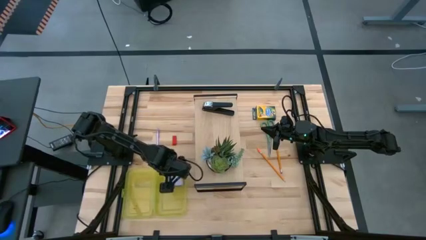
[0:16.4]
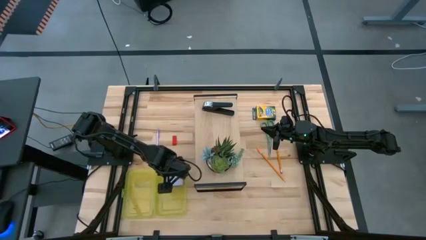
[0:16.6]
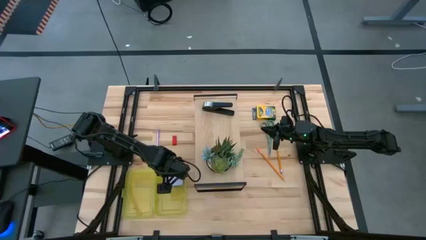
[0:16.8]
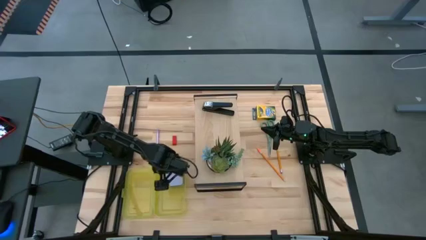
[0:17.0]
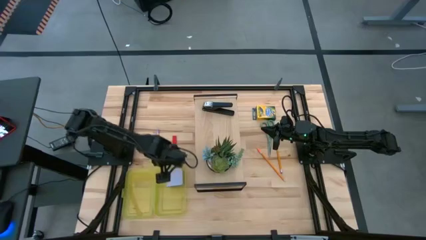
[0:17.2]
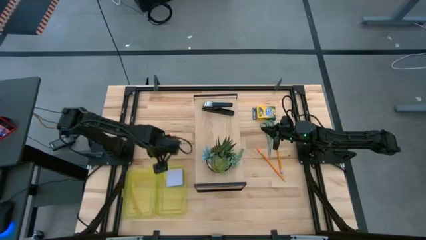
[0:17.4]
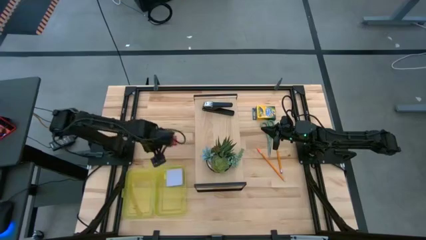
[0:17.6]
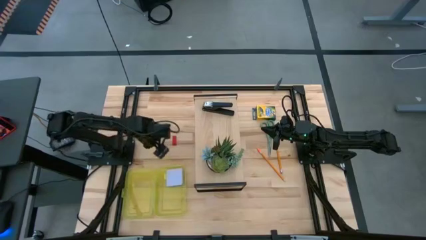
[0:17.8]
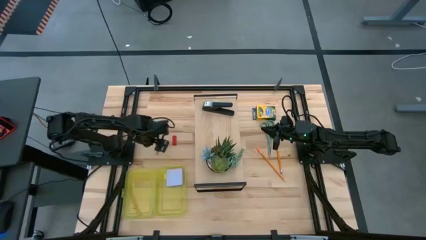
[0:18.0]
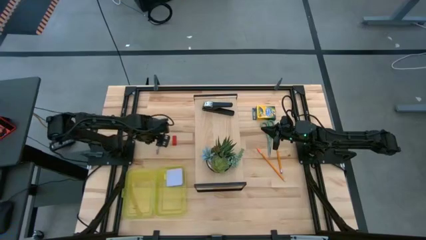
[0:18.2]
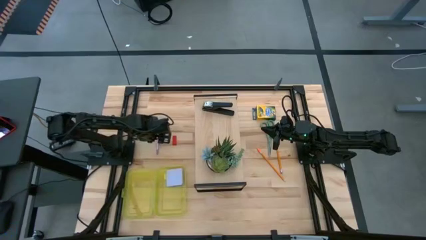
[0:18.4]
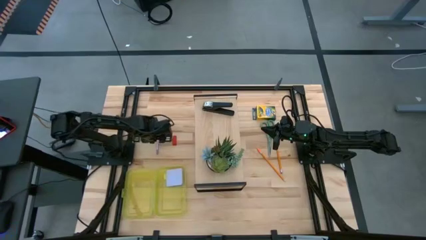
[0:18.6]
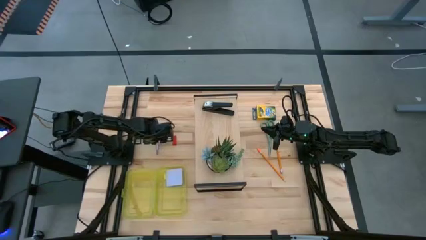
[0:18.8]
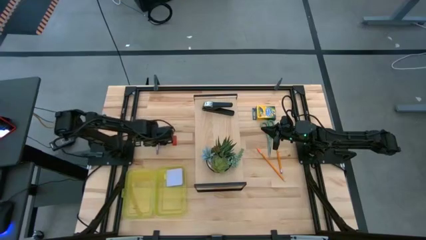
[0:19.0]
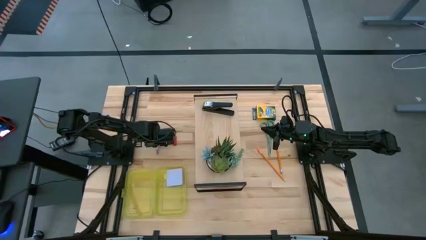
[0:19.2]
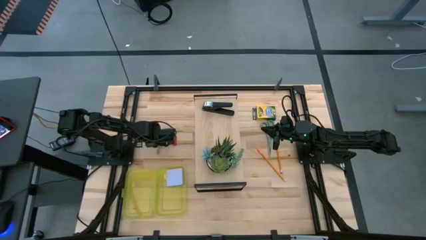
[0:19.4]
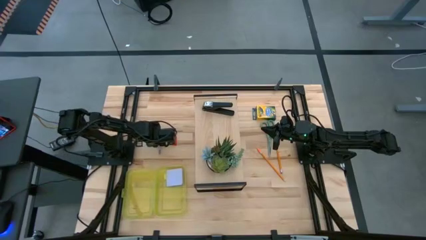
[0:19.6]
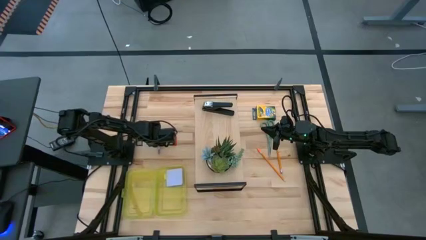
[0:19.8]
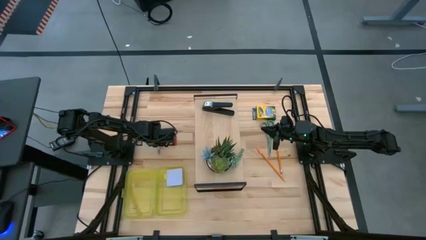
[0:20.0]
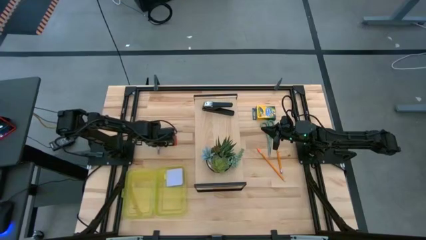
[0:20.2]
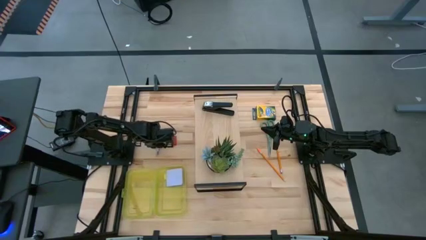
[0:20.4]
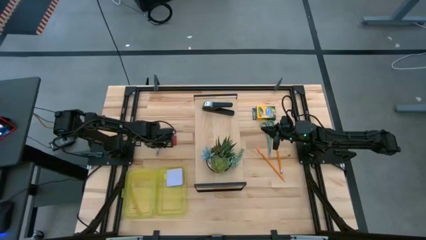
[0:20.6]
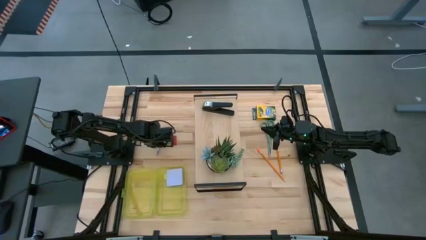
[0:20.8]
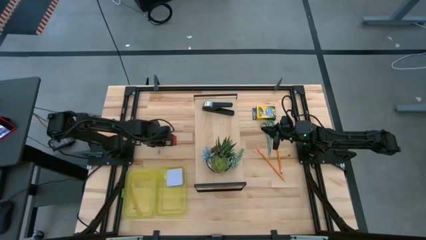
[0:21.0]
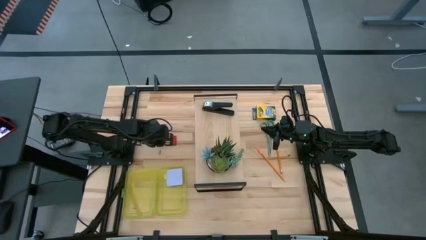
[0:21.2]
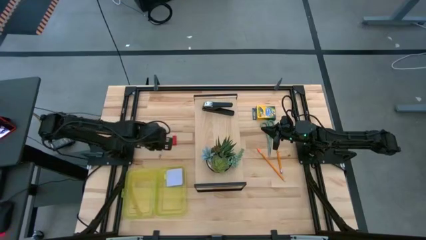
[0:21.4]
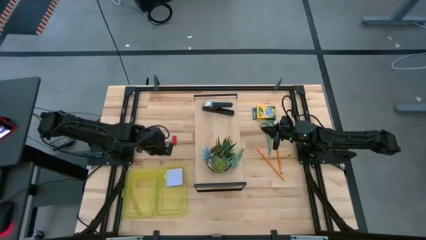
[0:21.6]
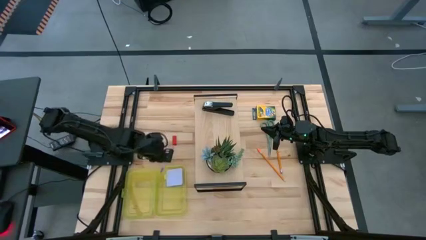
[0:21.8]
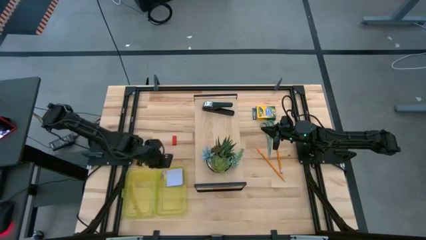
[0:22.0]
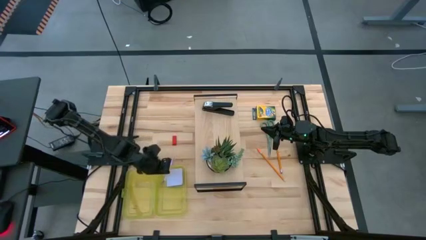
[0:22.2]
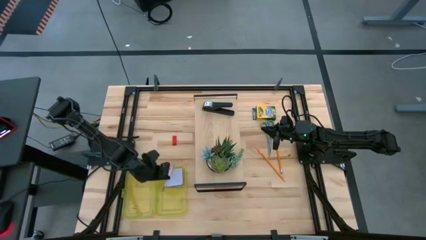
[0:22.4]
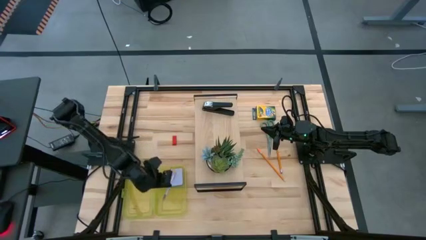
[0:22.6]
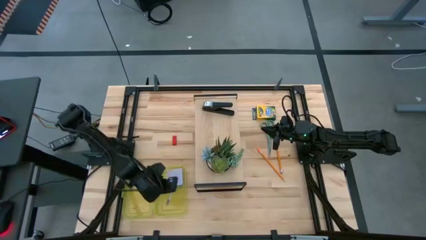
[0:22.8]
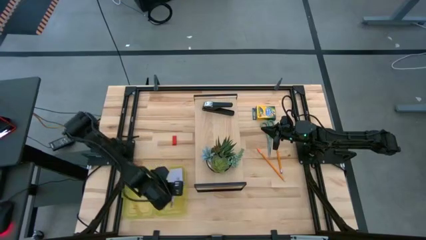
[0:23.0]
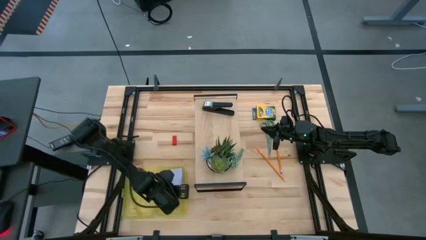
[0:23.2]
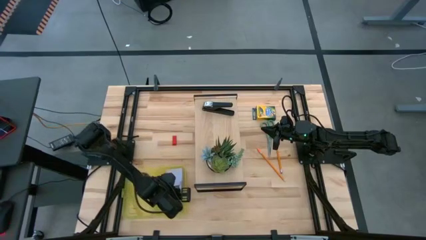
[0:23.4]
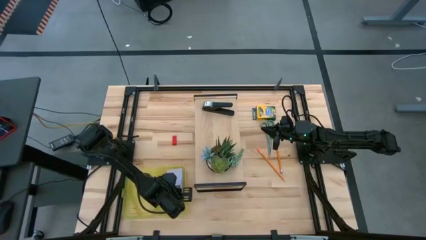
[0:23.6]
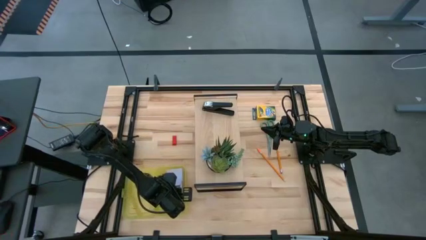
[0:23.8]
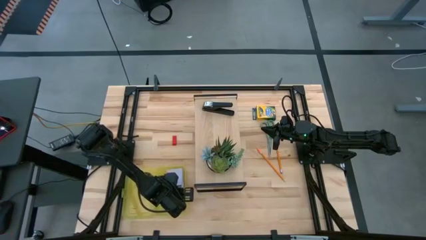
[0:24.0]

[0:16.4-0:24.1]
Task: Pack school essentials
Put the pink ballpoint pen into the yellow supply box

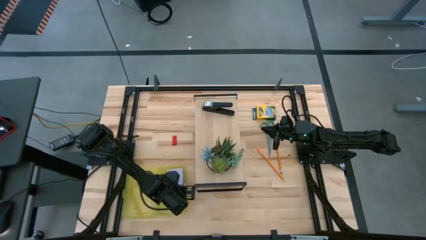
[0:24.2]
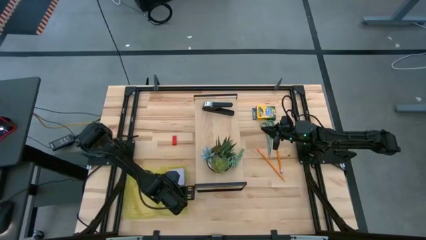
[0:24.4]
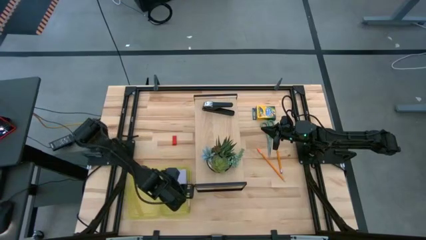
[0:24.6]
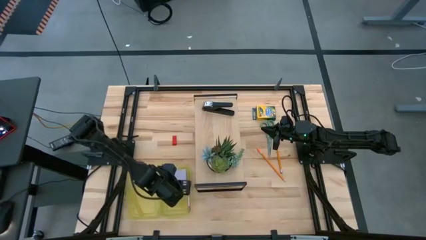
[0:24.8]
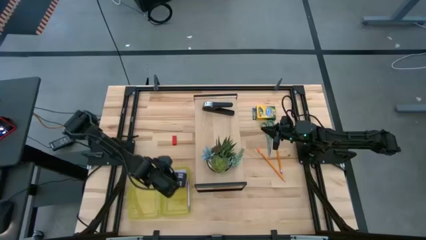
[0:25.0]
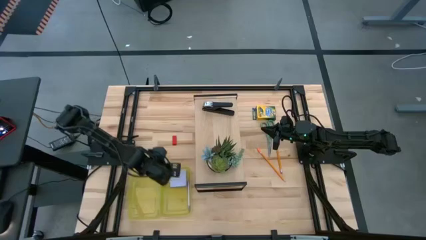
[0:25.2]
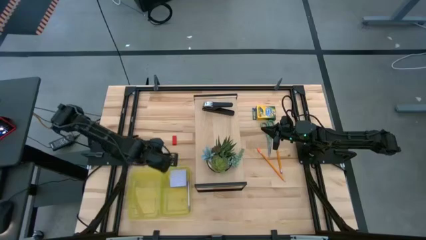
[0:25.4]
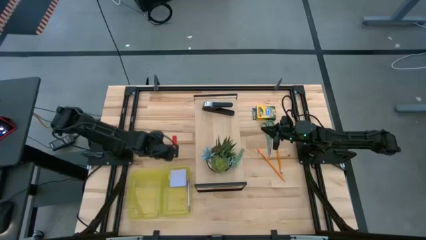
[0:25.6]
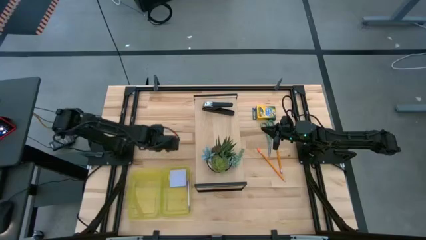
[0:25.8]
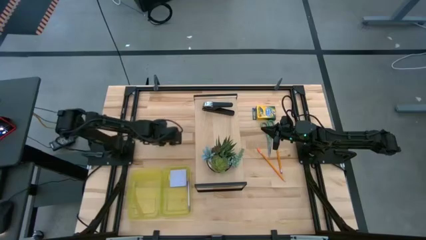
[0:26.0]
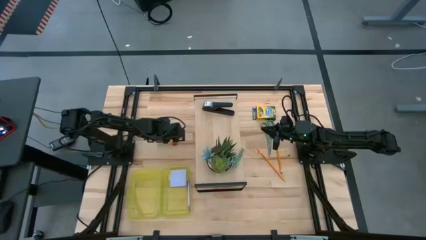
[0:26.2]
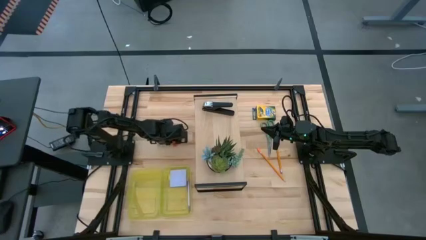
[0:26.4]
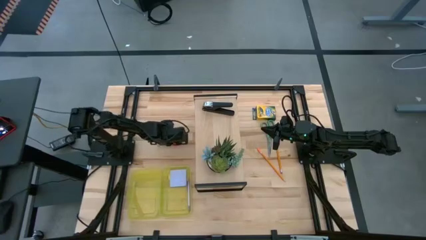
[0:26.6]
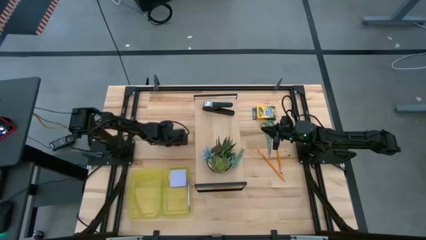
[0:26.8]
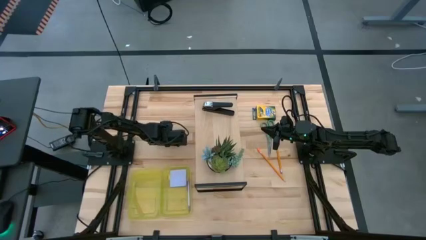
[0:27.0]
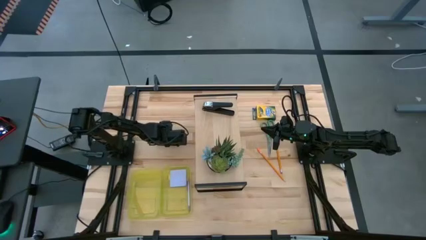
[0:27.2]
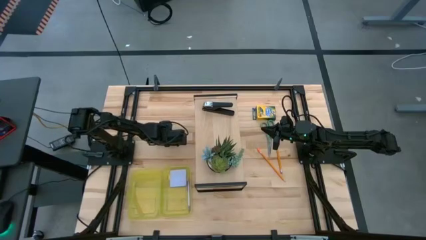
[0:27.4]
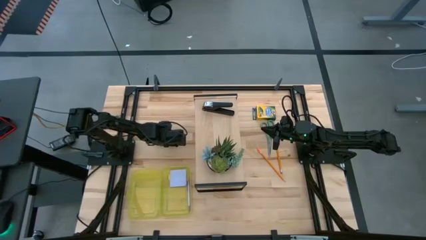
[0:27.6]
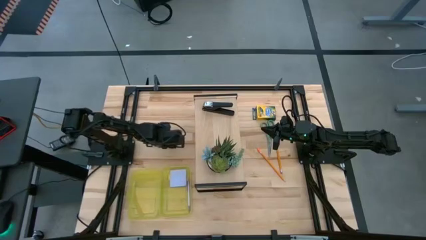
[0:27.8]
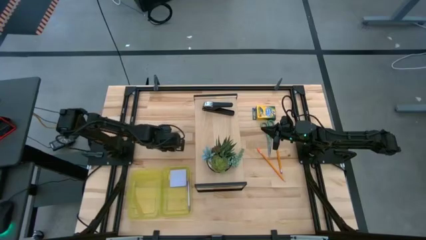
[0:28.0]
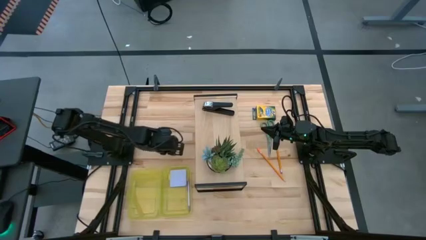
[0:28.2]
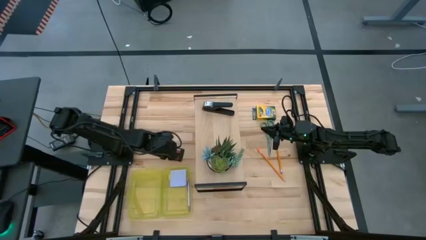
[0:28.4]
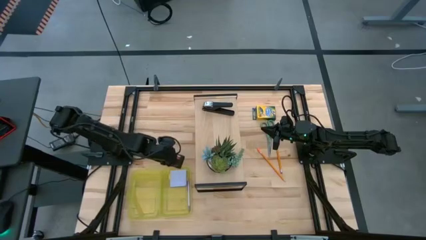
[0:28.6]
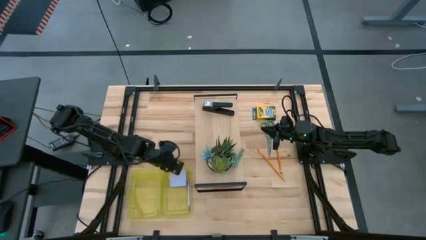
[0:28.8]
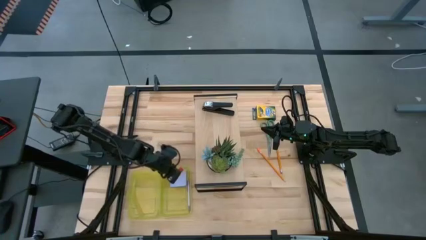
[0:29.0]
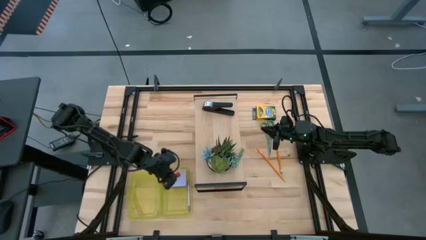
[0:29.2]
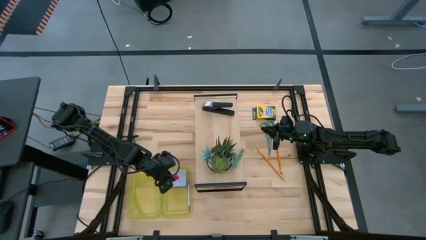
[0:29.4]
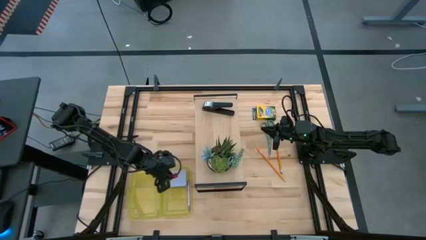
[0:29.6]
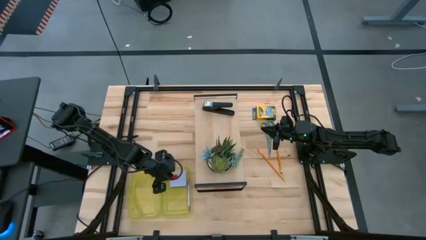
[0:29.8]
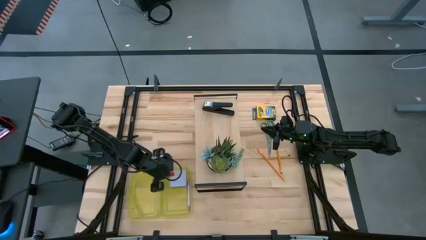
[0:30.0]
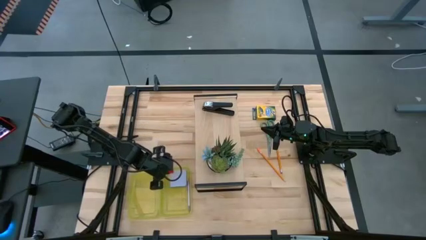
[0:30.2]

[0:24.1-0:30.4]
Put the red eraser into the yellow supply box

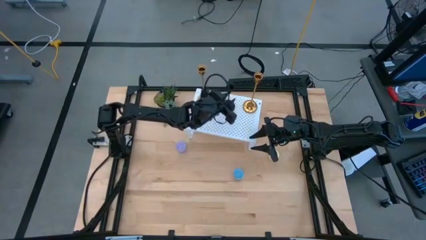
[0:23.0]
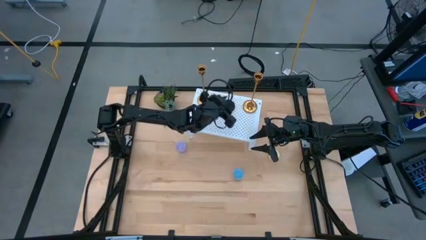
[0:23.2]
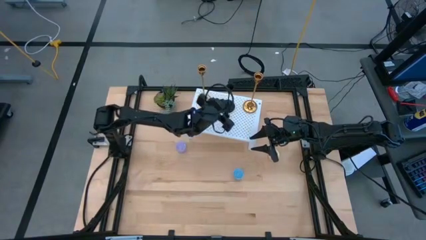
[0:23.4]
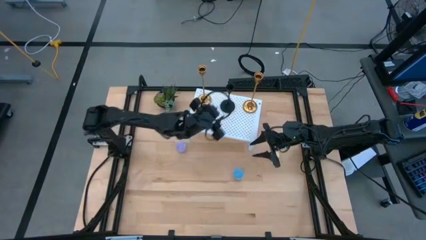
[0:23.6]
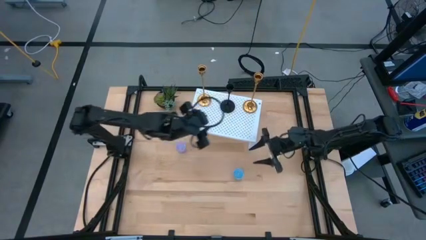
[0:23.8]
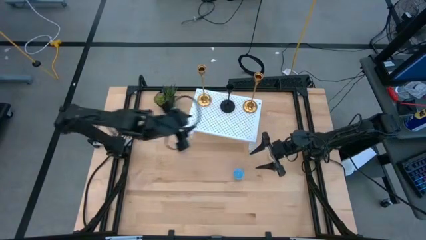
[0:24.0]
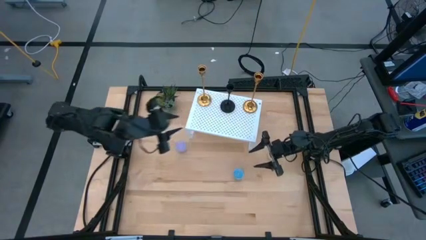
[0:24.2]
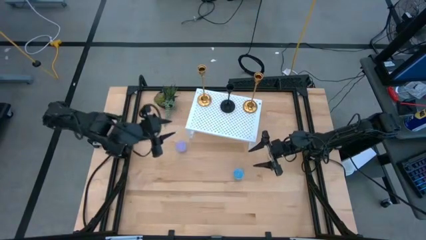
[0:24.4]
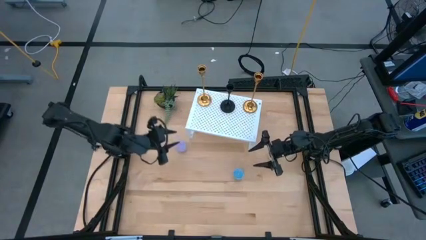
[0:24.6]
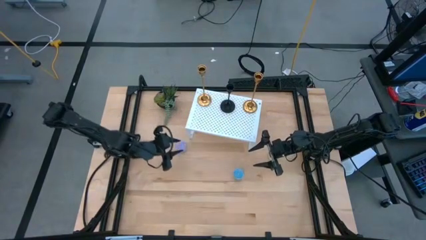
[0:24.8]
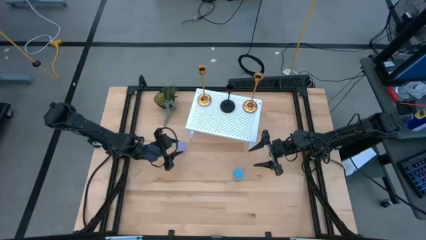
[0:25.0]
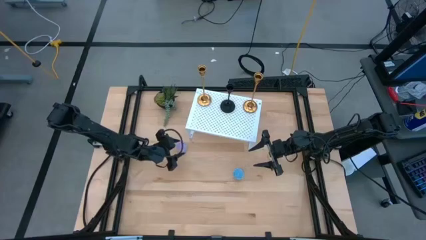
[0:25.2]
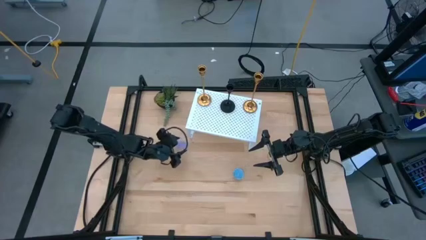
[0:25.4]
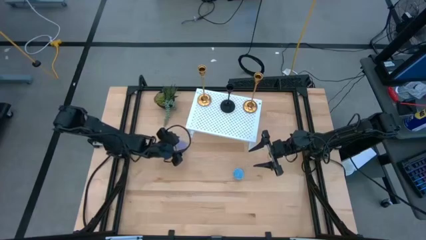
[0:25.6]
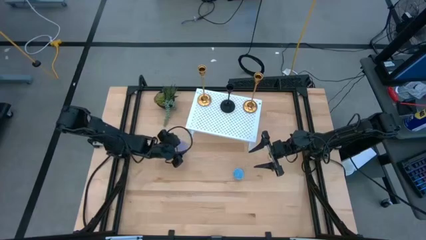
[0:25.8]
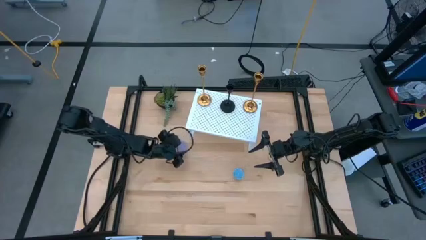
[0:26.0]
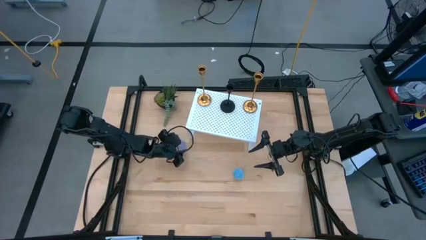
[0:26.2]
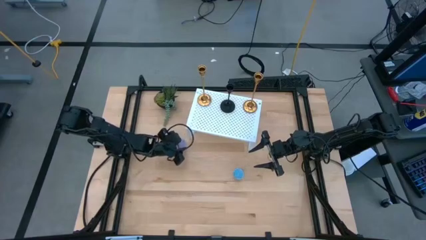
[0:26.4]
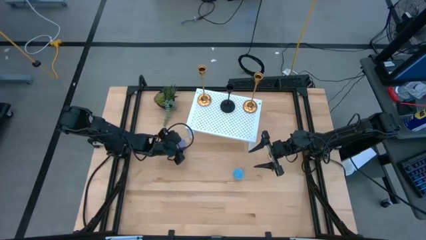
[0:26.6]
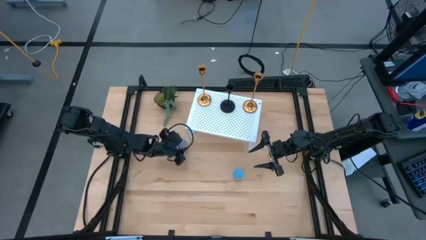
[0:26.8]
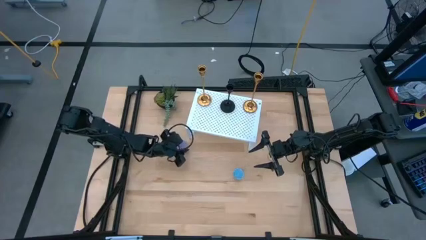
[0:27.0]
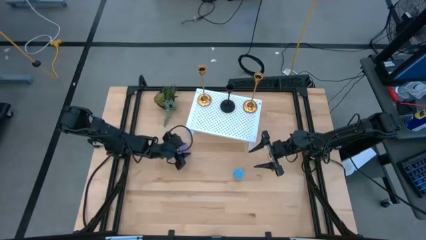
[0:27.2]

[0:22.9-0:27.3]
Task: Pick & Place candle stick holders
Put the violet candle on the shelf
